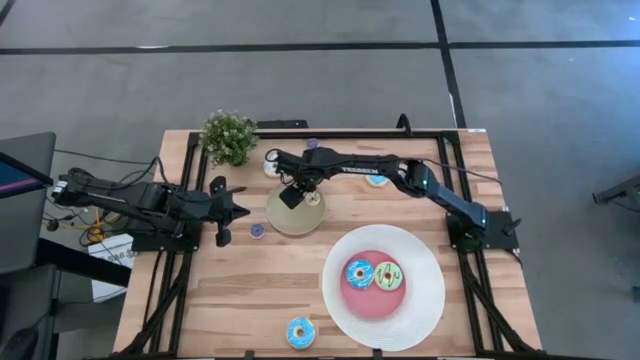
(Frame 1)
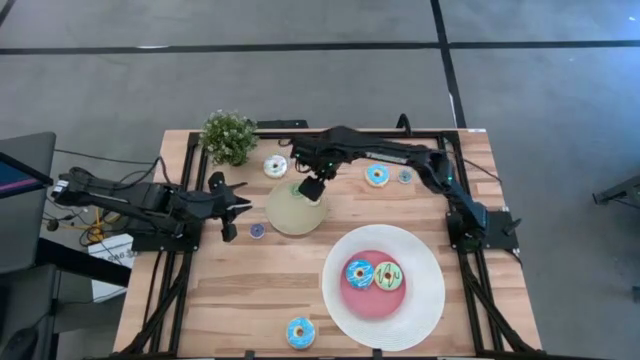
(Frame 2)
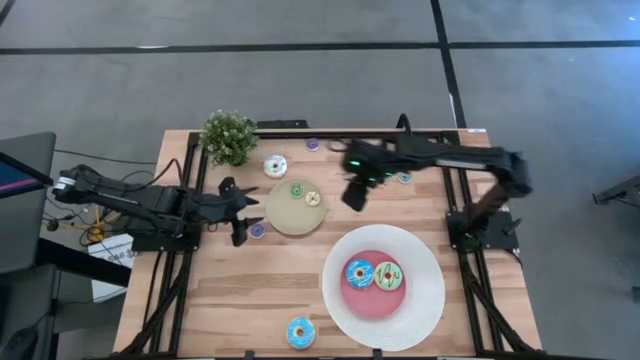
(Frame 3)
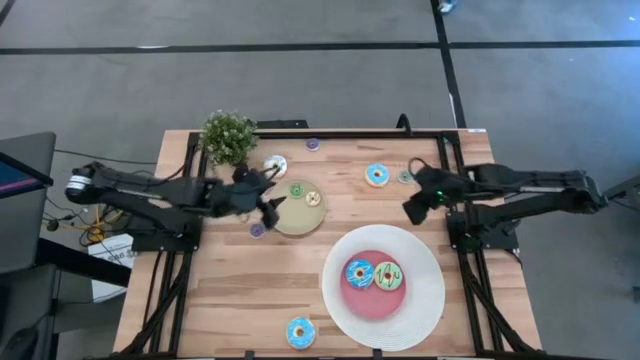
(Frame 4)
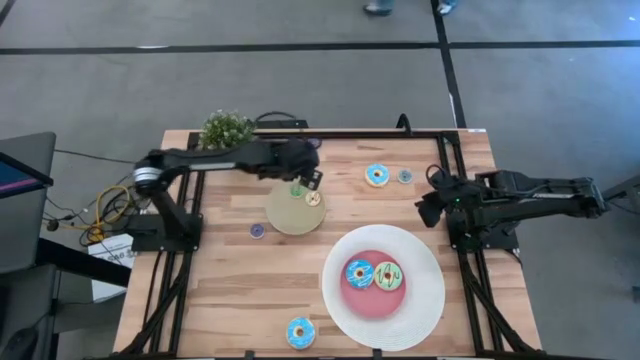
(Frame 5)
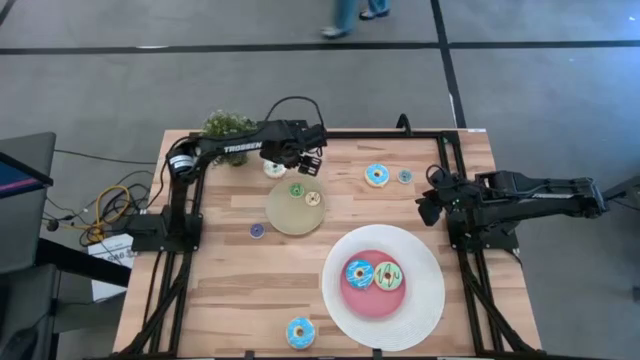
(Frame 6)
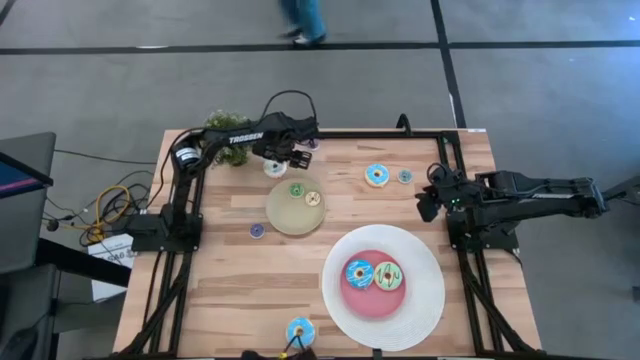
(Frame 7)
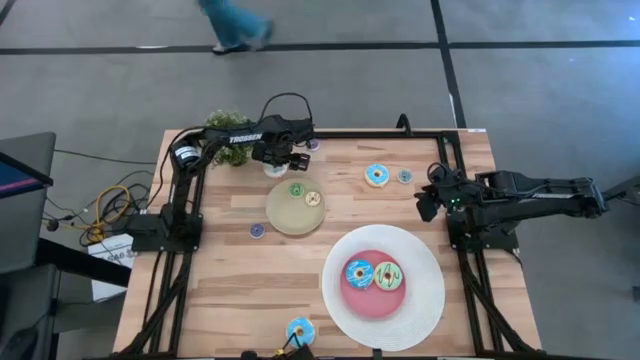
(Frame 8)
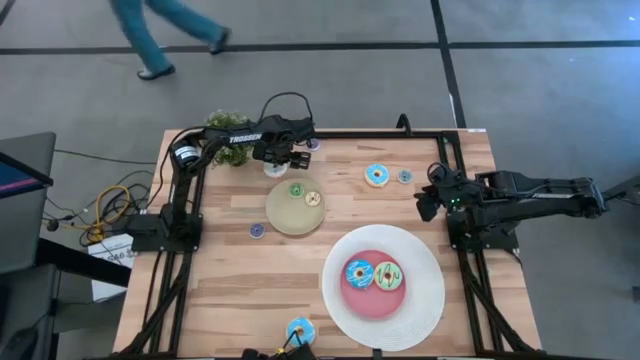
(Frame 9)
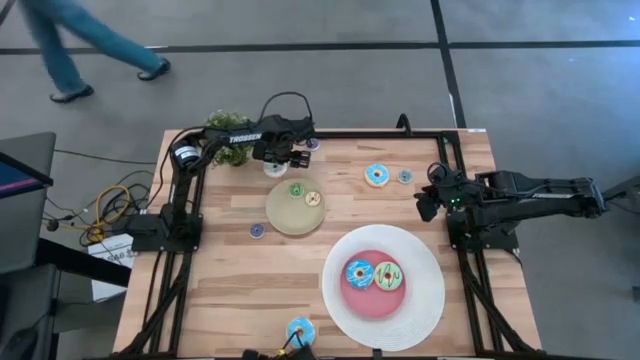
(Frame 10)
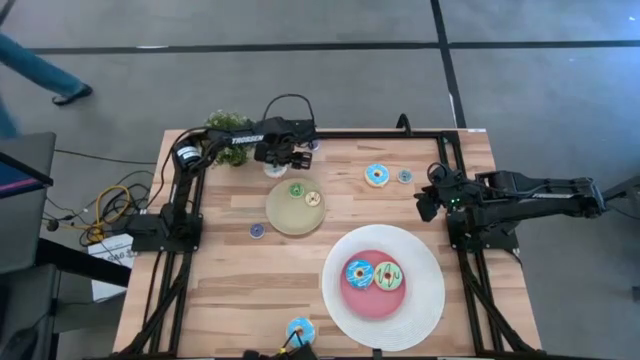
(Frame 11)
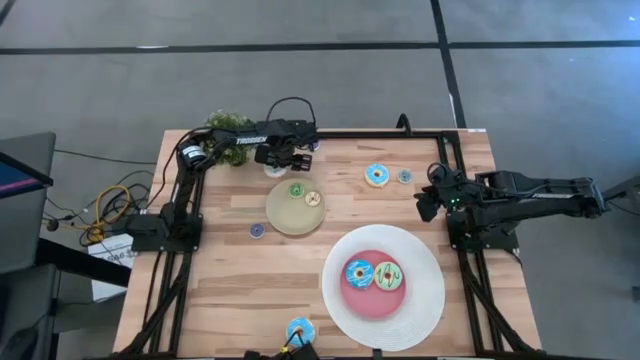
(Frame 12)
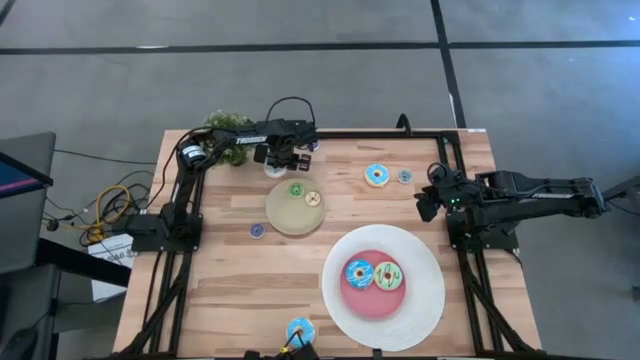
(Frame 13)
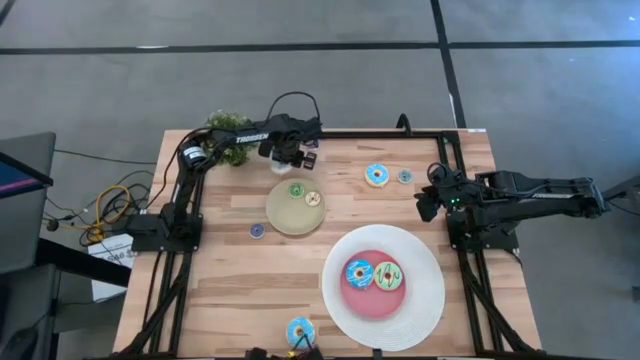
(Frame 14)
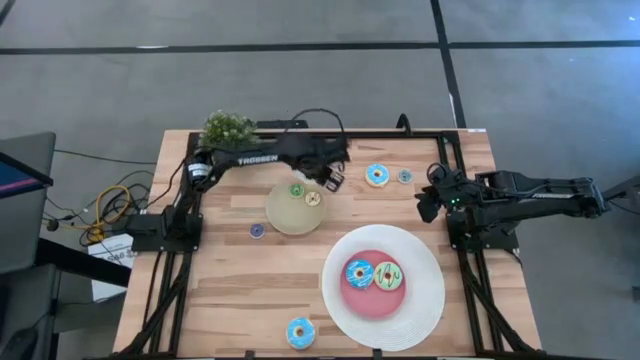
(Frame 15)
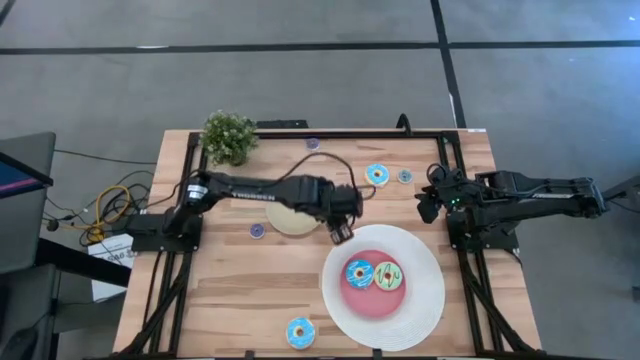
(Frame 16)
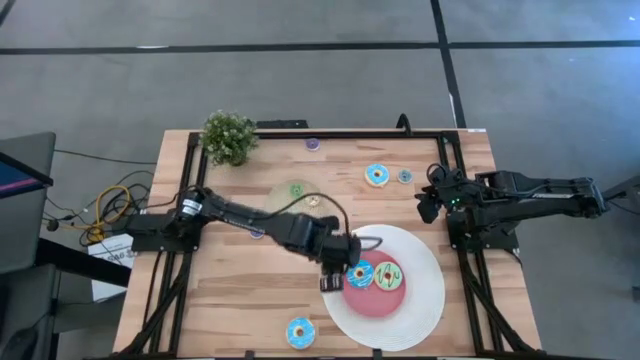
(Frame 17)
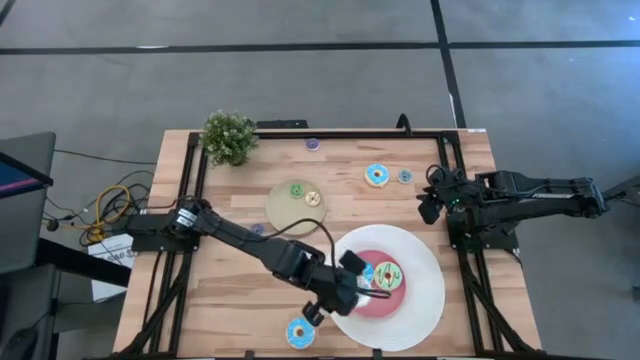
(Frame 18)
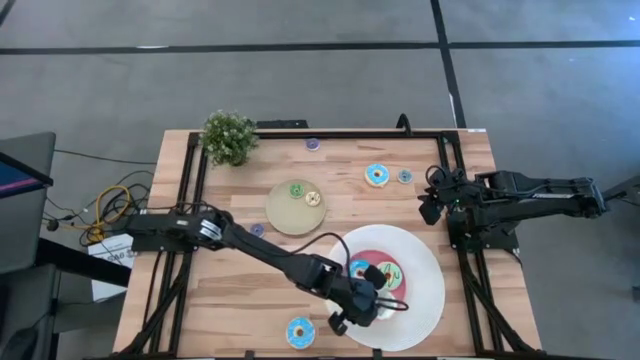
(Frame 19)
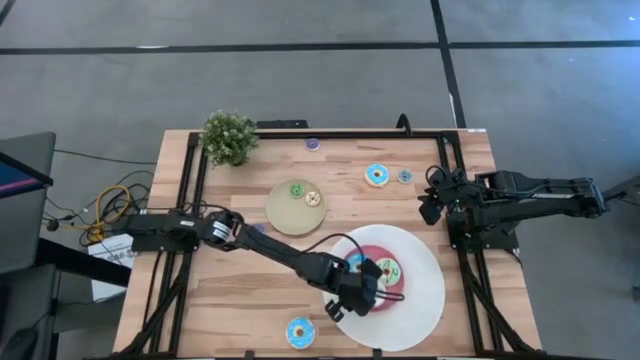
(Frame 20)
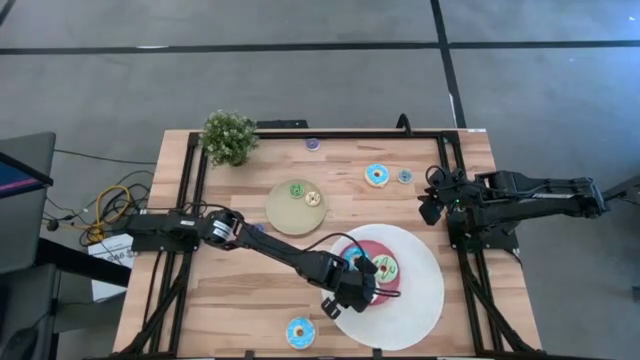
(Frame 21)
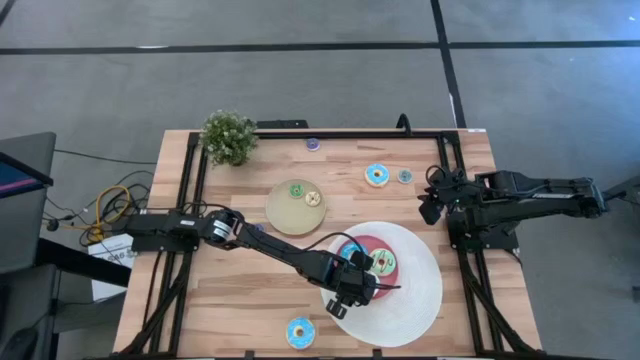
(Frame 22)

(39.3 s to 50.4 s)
Task: Pick & Place donuts
Put the large white donut on the pink plate

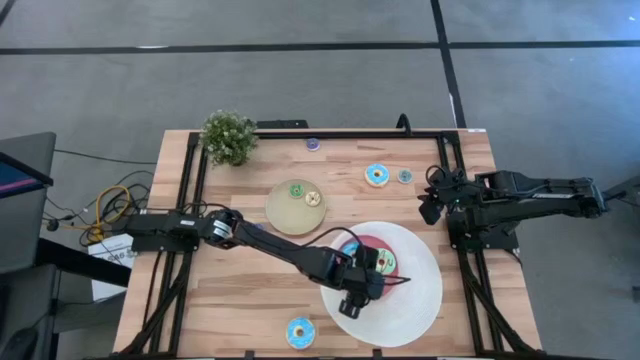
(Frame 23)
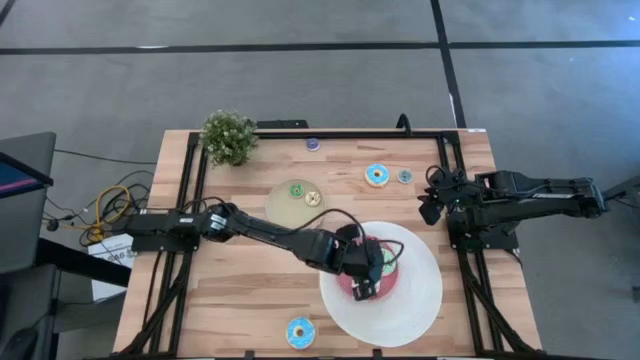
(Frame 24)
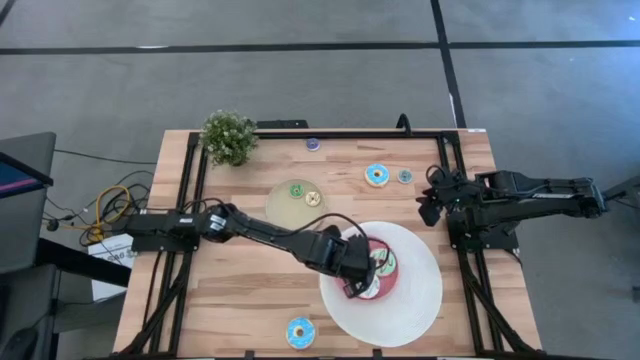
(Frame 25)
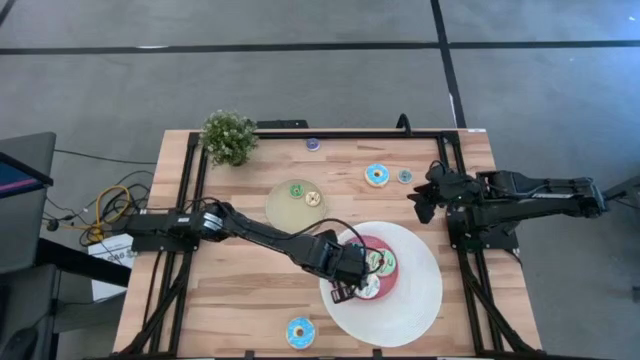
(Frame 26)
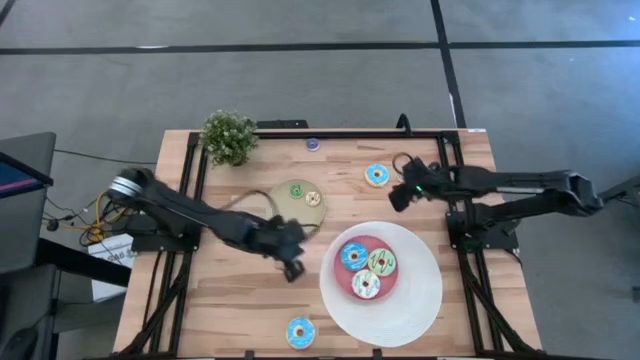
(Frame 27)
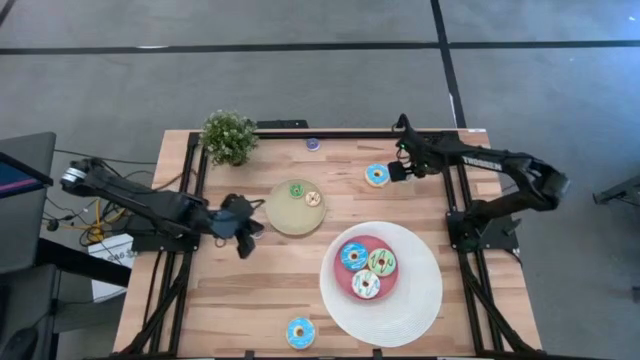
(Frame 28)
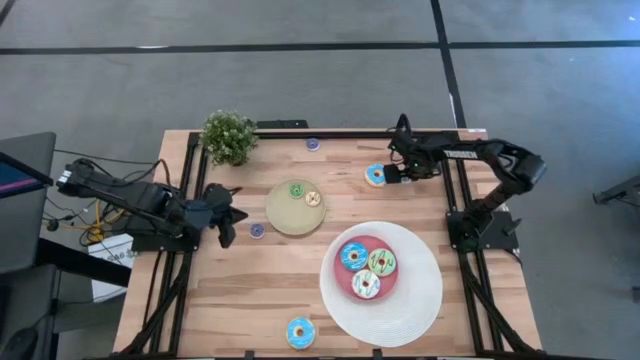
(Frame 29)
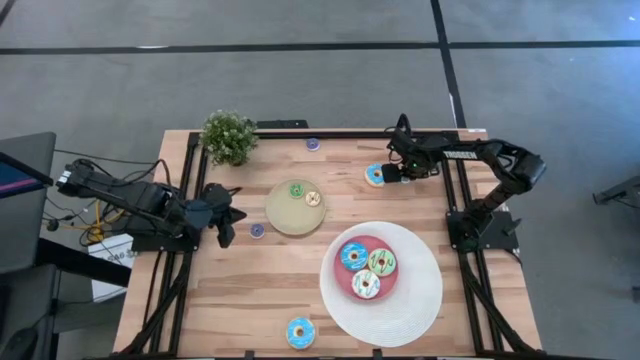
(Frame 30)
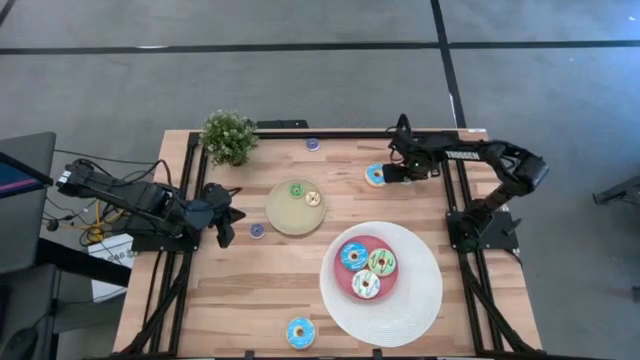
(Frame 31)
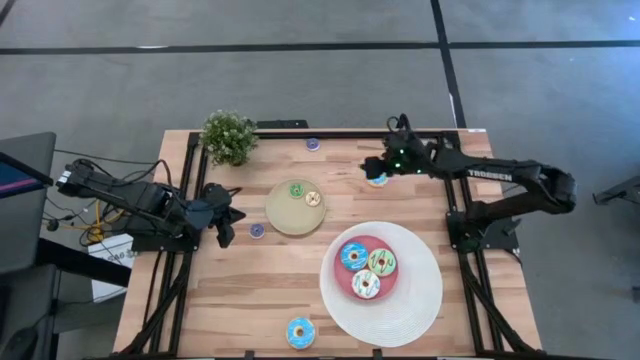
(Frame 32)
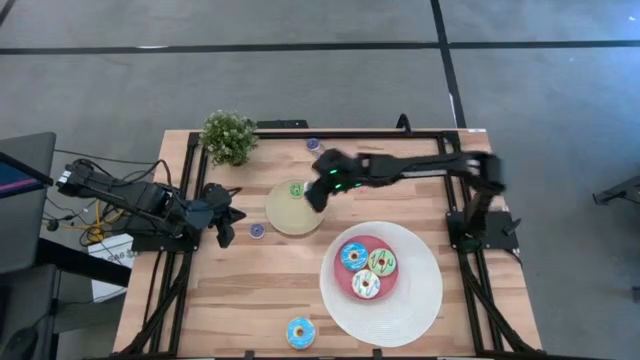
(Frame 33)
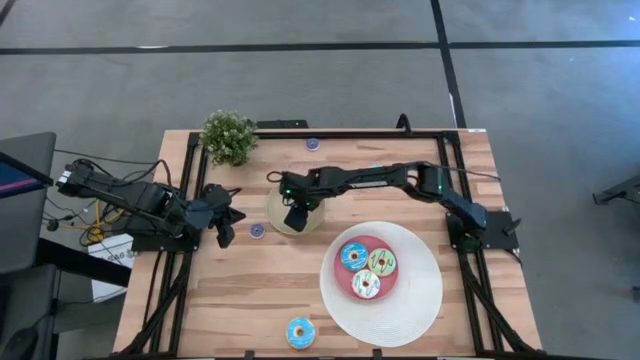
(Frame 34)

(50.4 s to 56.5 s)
Put the small blue donut on the brown plate

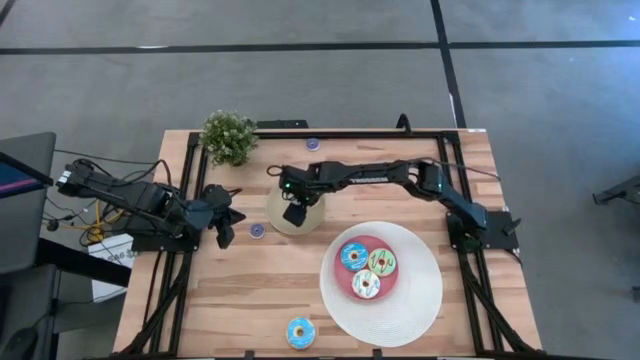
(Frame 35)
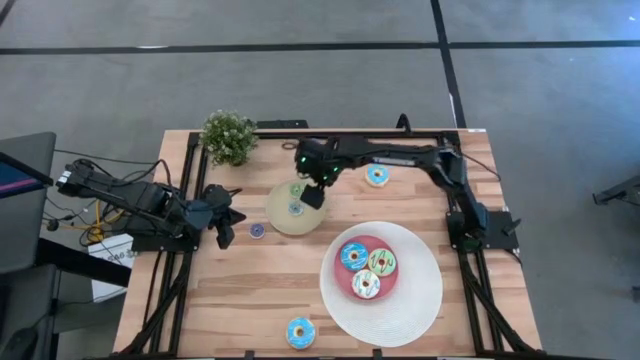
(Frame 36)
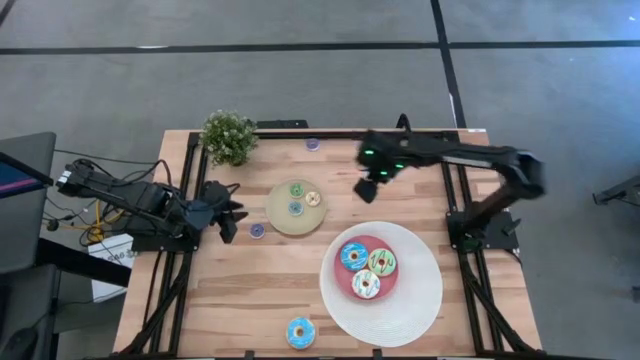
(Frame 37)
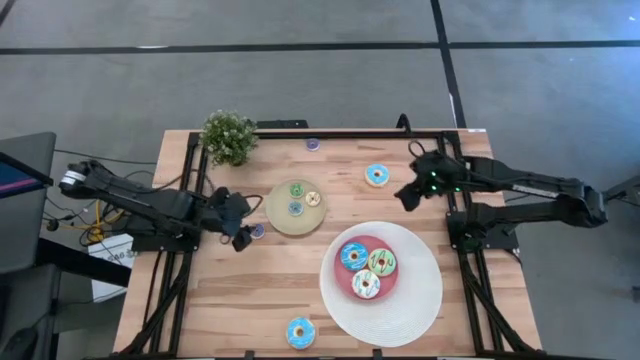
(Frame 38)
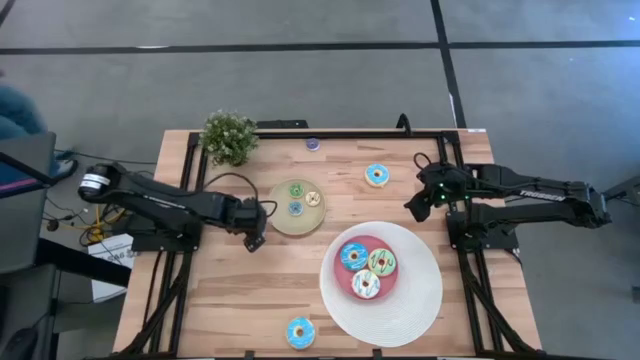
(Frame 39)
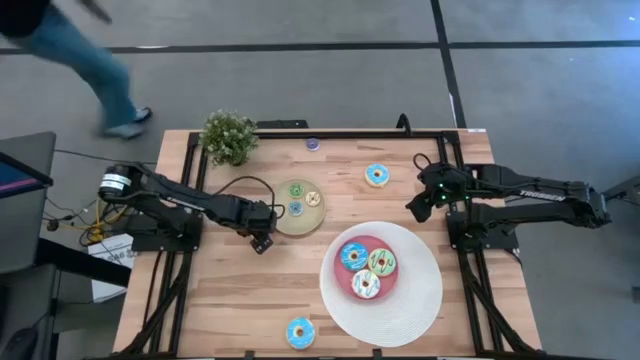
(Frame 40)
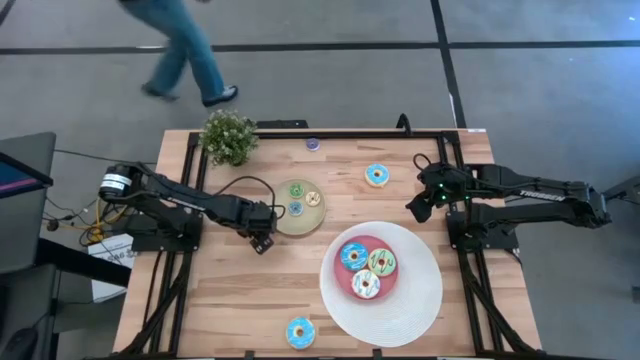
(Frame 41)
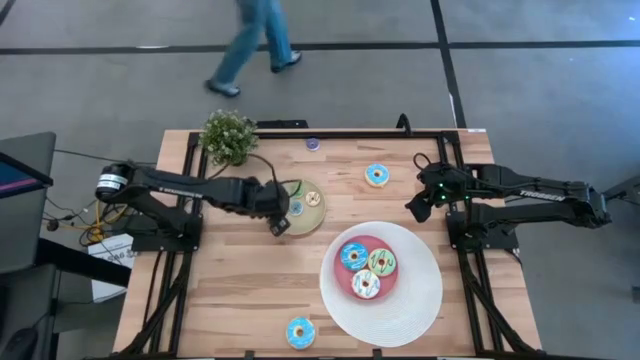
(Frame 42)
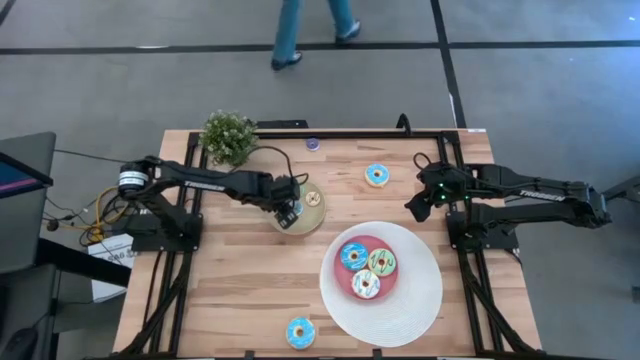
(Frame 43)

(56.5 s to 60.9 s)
Put the bottom small dark blue donut on the brown plate
